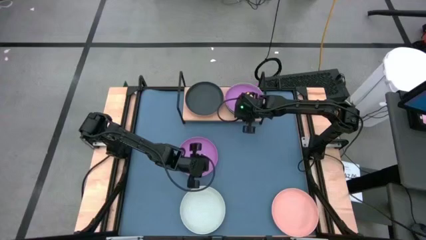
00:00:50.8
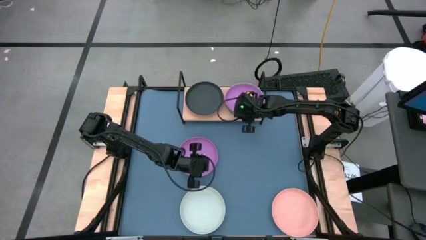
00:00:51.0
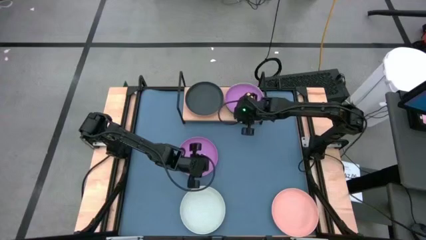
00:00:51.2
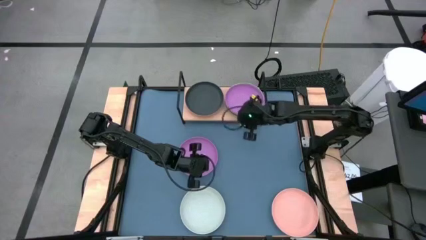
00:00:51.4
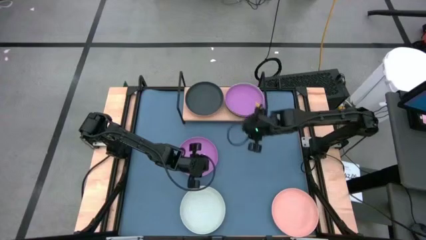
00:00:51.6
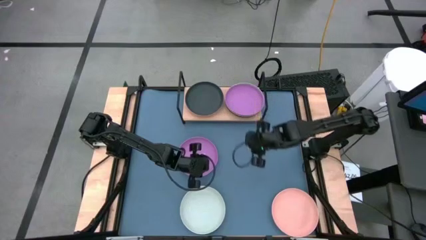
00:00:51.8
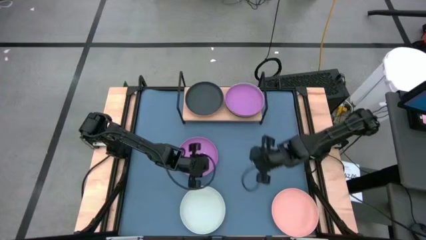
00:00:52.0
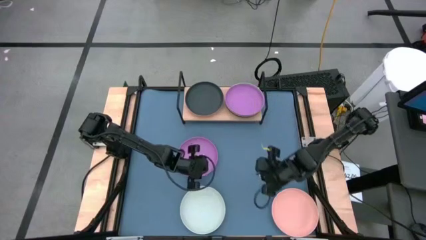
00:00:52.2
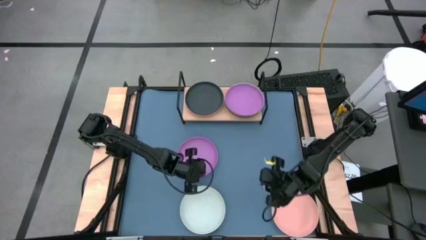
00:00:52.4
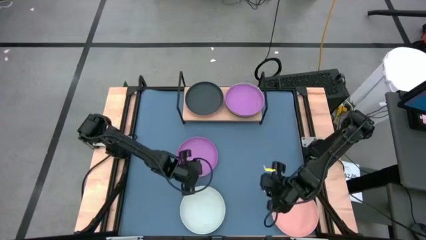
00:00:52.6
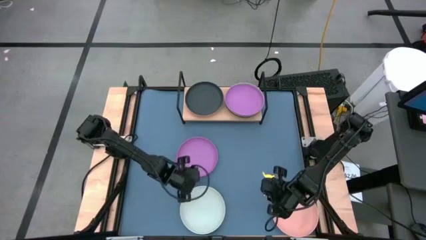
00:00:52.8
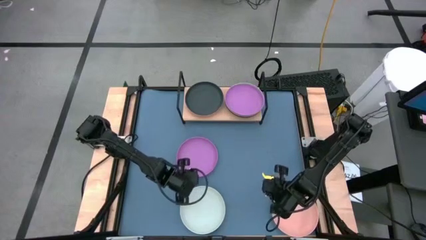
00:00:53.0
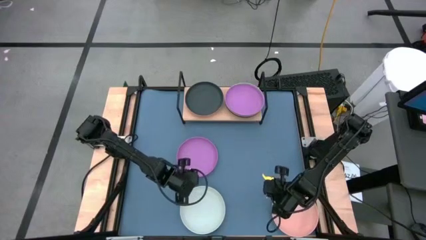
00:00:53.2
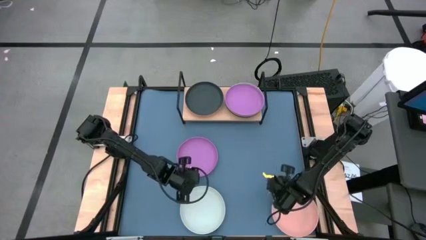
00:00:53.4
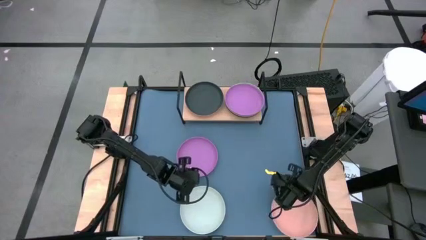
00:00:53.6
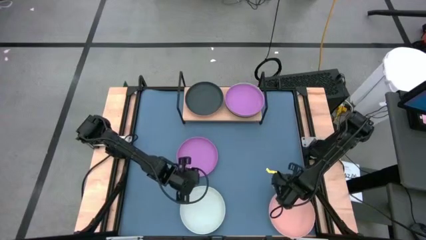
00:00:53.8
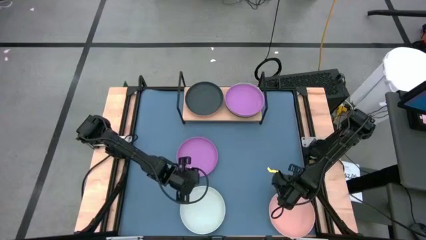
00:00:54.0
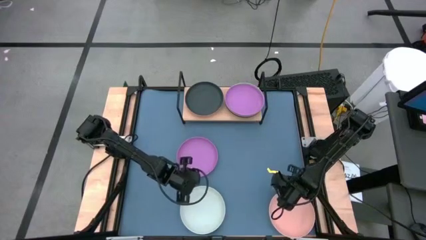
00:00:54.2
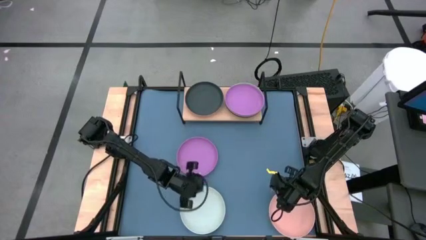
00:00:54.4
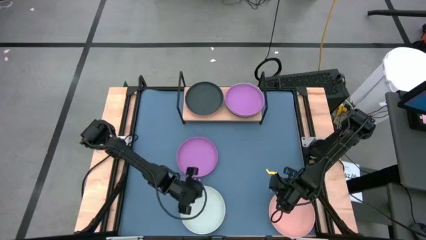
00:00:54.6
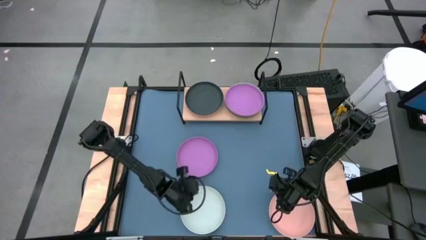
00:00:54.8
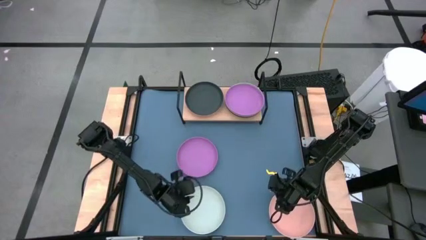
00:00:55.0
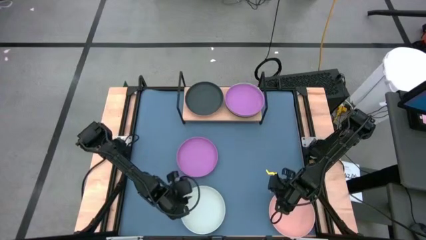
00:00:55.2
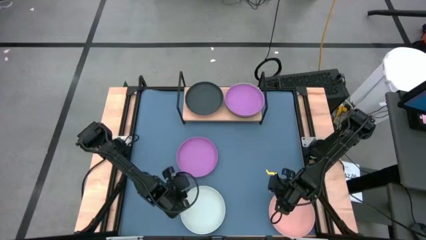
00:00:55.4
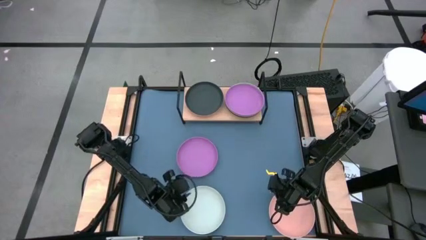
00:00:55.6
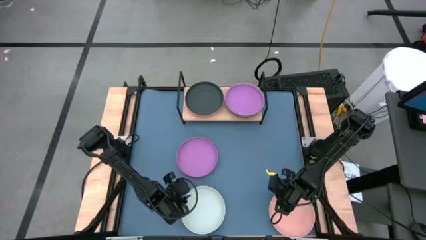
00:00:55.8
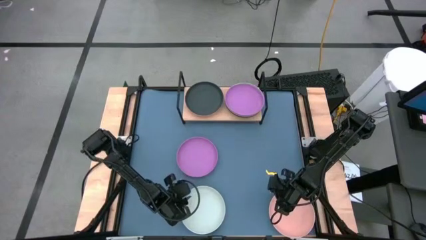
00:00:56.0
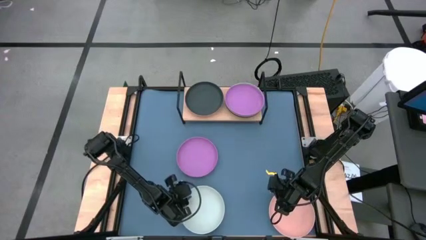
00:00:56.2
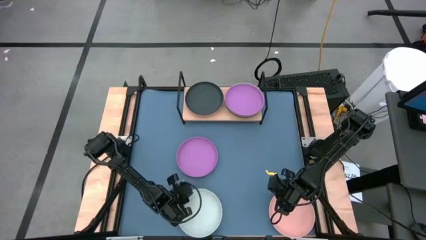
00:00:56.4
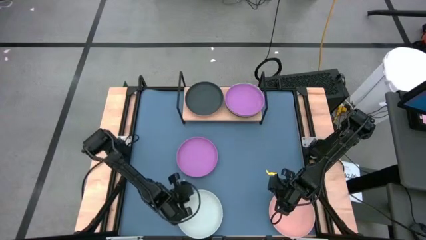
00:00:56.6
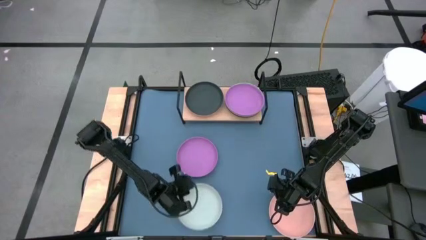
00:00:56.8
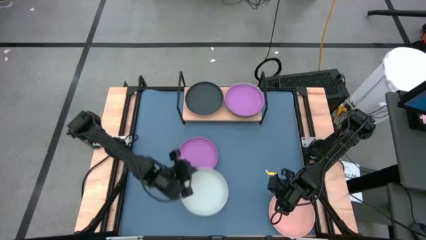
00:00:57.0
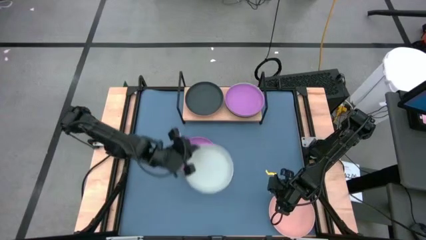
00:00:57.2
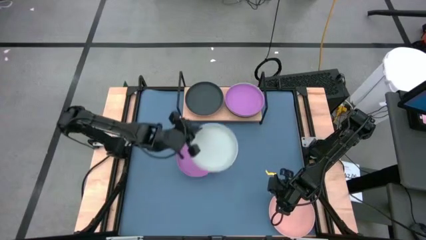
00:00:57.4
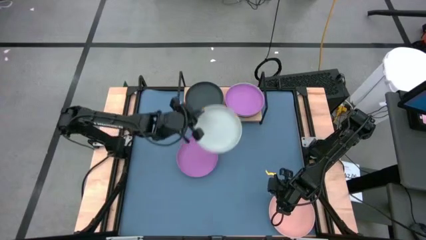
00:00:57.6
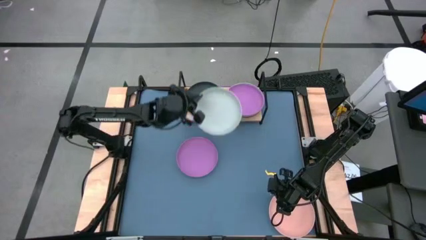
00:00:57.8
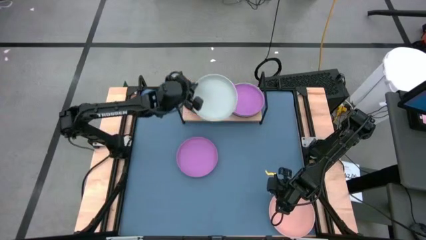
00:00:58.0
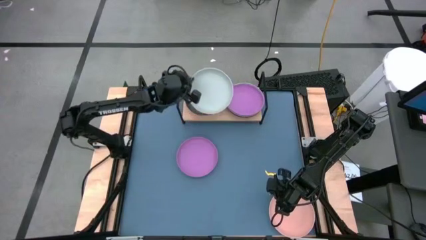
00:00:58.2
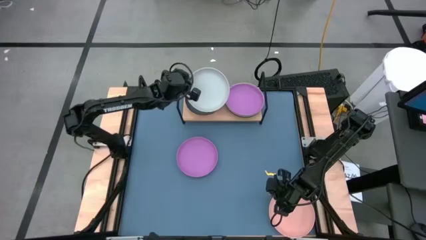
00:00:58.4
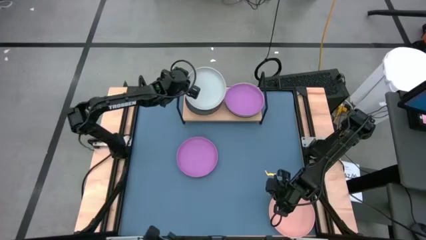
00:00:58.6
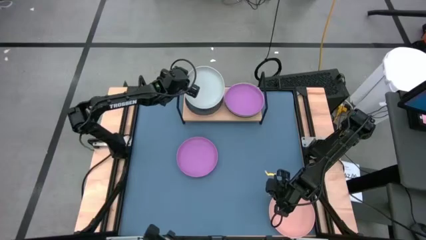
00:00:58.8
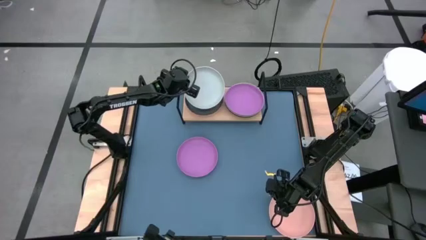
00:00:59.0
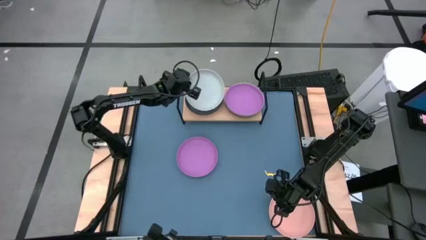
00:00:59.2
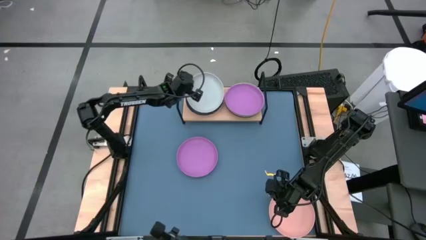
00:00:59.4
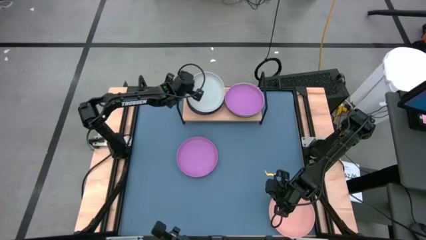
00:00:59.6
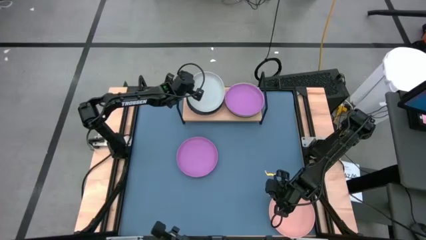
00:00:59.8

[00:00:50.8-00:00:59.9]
Task: Place and stack plates onto a shelf
Stack the green bowl on the black bowl

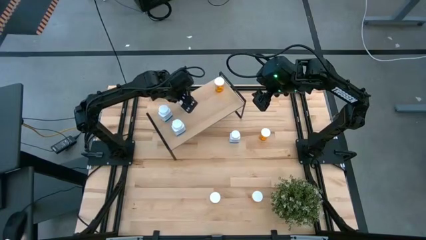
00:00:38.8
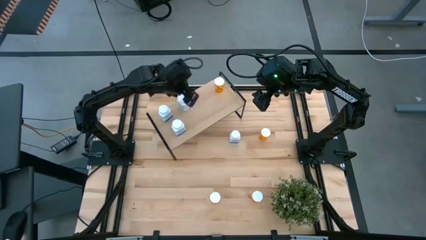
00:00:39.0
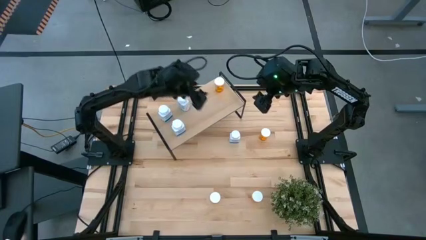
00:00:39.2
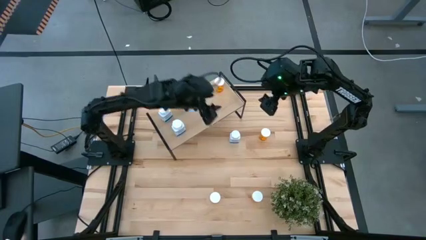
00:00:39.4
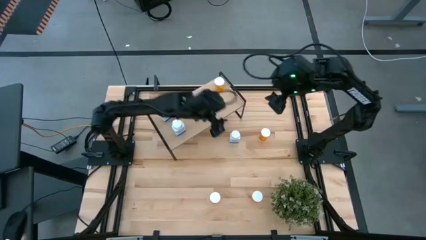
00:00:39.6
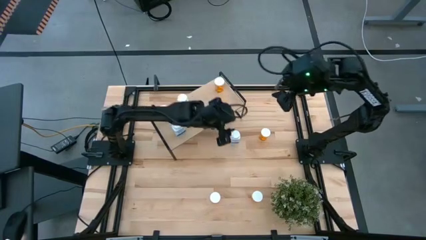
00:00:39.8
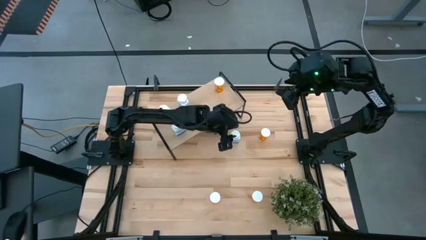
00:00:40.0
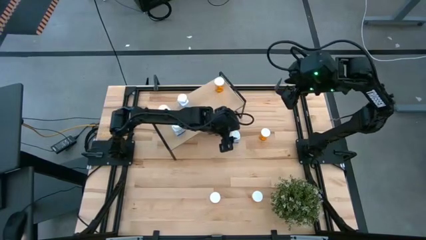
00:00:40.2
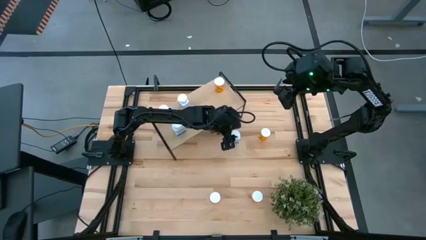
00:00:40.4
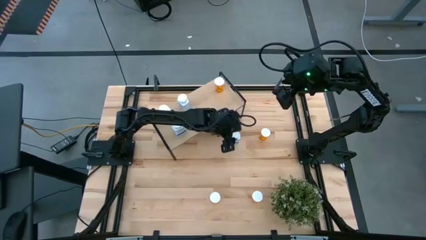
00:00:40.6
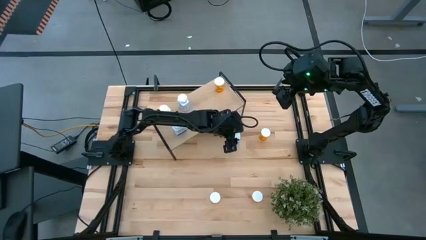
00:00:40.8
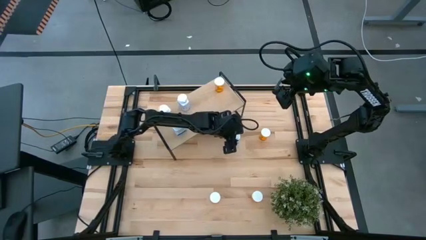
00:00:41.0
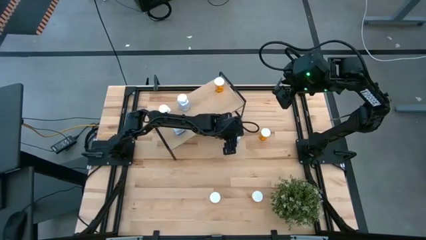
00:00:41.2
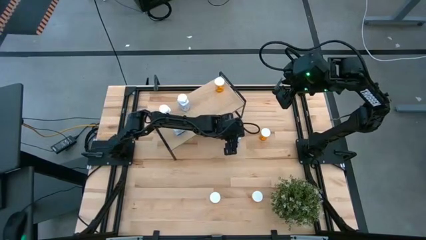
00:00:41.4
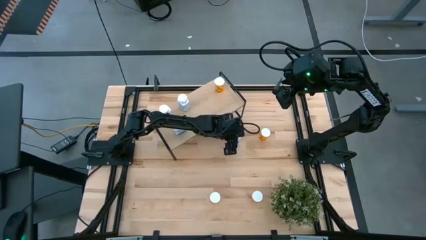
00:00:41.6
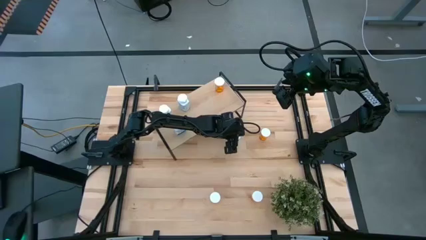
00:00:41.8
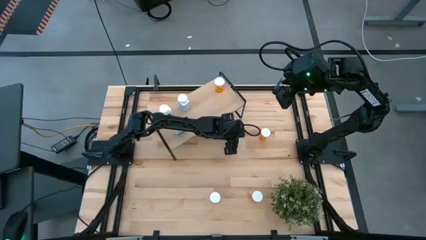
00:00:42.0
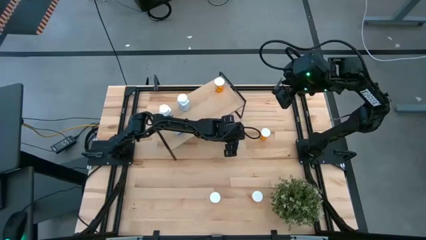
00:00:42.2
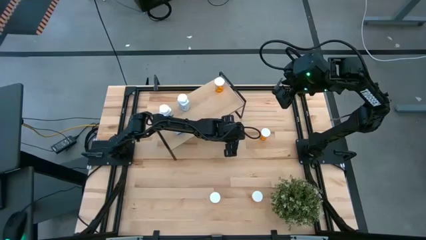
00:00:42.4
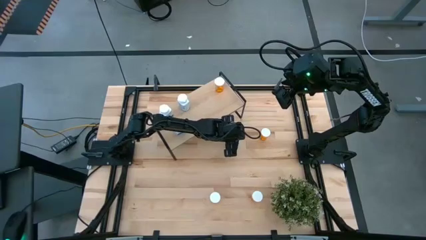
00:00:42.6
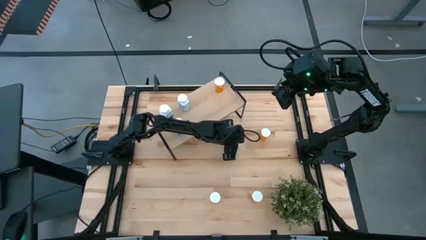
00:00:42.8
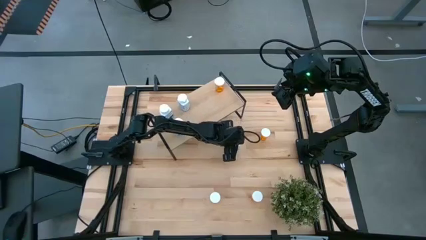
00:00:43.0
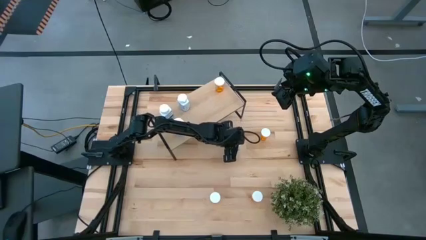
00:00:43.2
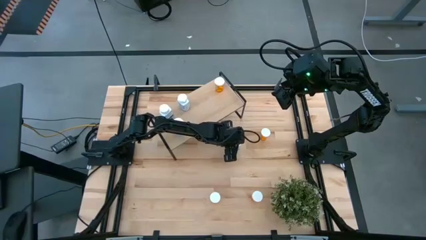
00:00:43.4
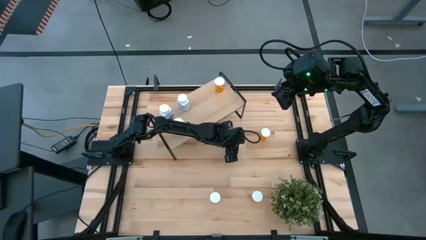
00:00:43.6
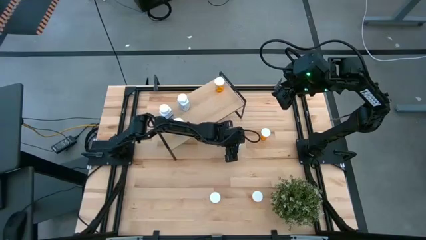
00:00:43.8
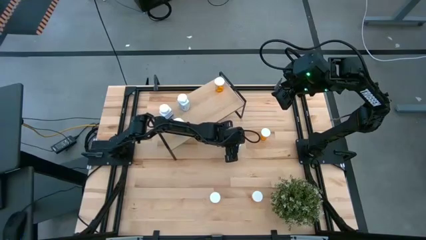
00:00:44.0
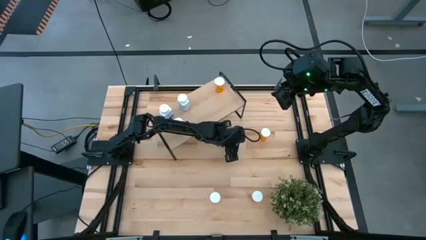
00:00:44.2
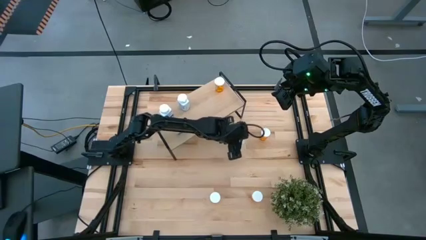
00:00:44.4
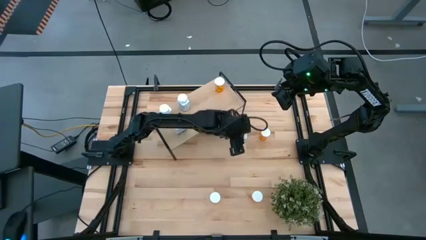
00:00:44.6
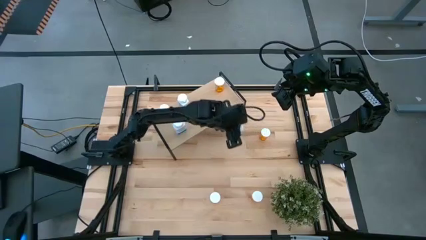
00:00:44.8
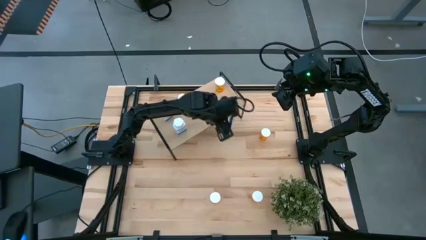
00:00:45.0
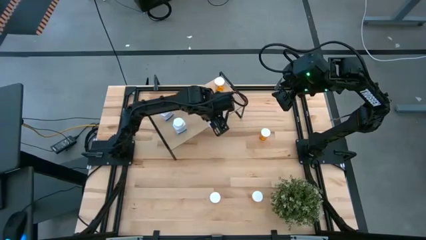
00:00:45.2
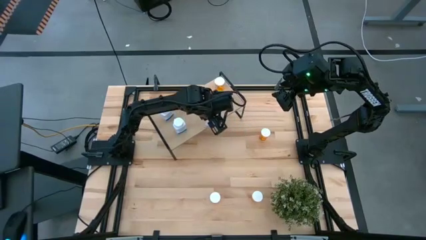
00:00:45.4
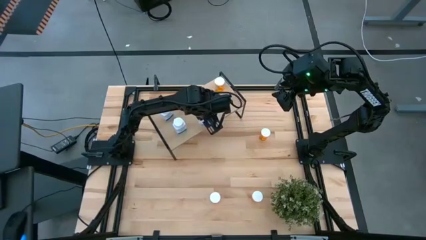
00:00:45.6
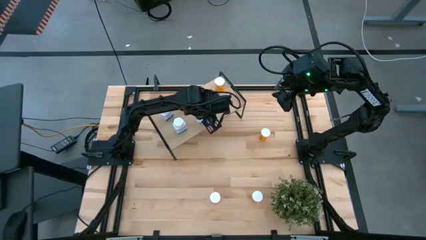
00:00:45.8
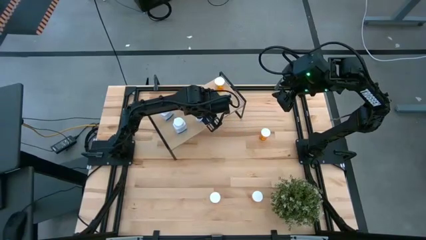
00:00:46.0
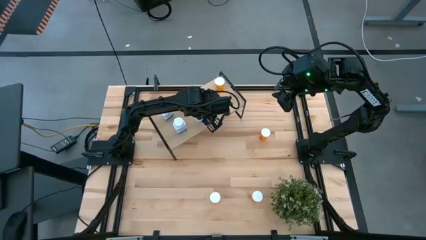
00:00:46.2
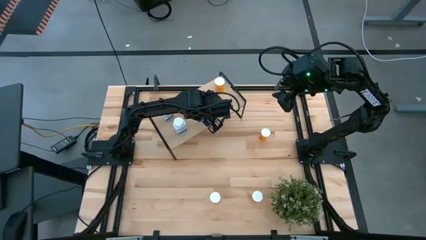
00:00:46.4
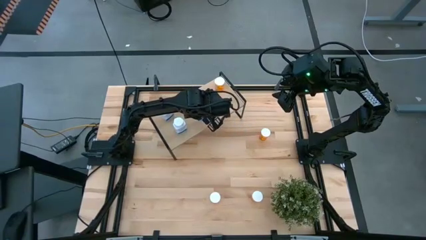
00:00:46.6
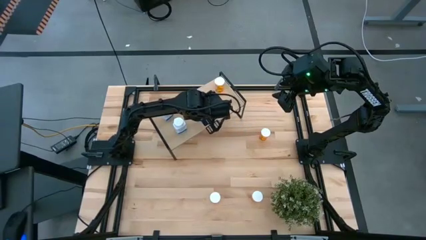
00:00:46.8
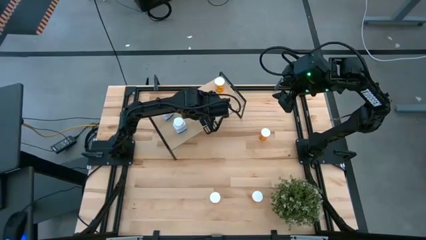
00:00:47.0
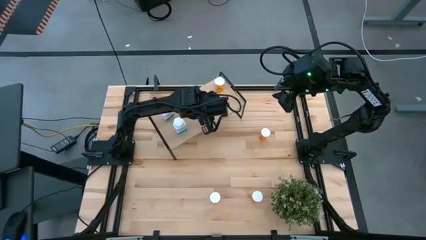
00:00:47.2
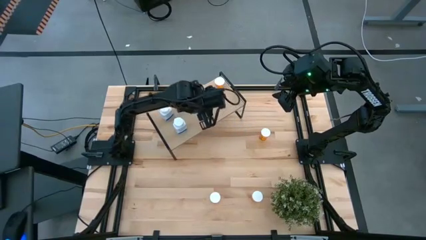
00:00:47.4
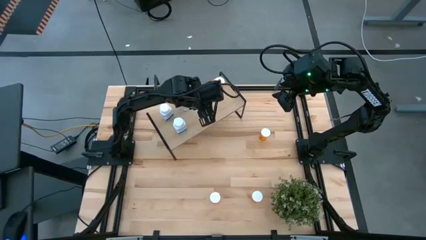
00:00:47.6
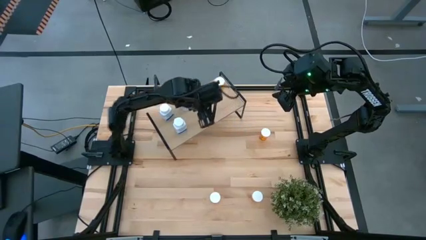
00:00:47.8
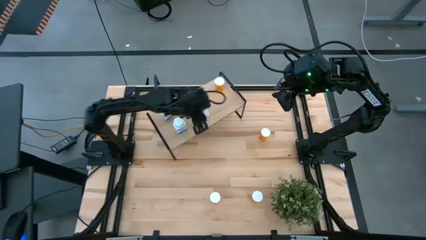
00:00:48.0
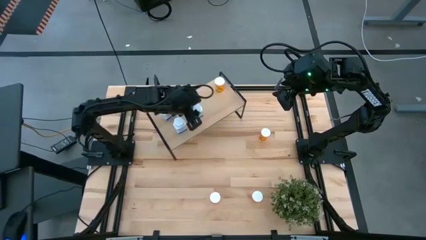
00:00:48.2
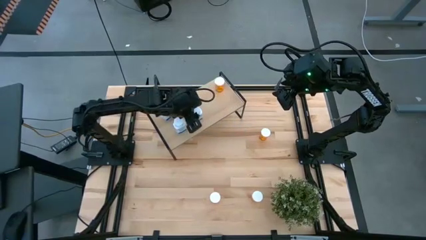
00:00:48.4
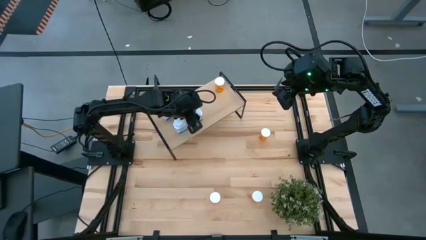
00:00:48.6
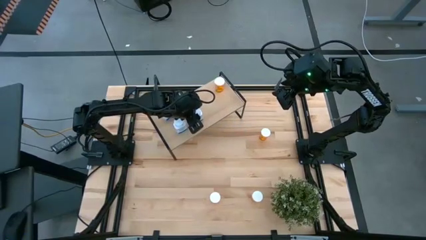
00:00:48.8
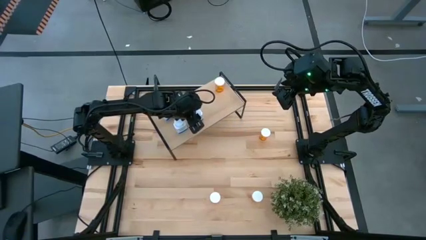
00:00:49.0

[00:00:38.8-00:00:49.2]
Task: Pick and place medicine bottles onto shelf by color
Put the white pill bottle on the shelf aligned with the other white pill bottle
